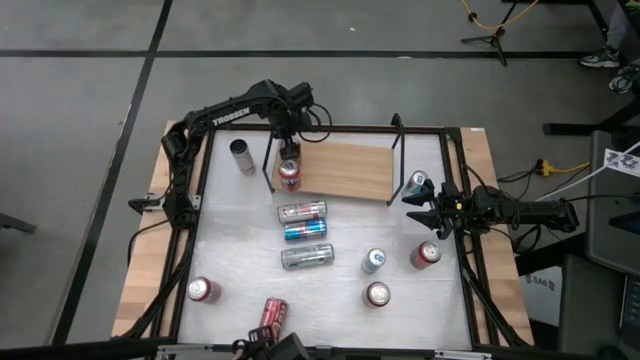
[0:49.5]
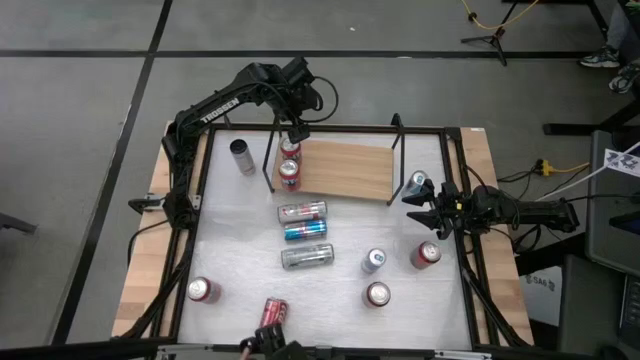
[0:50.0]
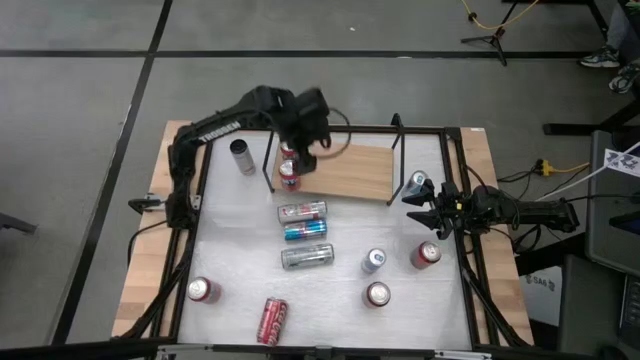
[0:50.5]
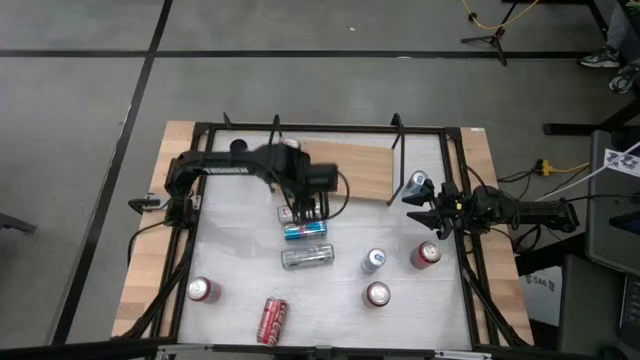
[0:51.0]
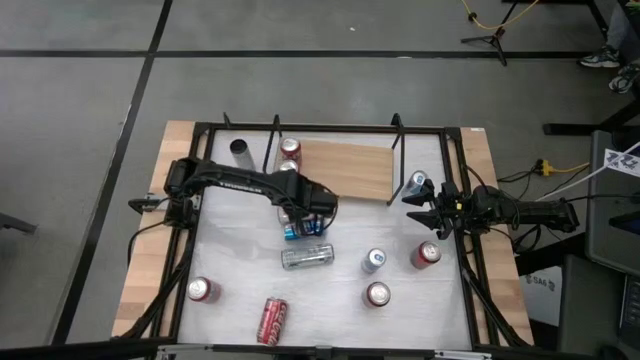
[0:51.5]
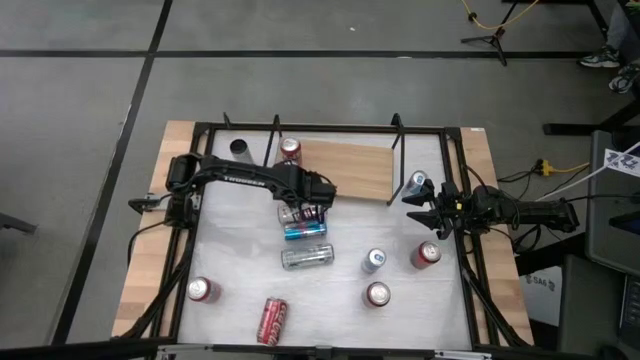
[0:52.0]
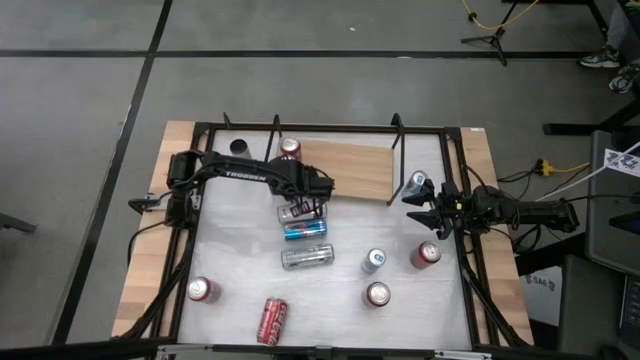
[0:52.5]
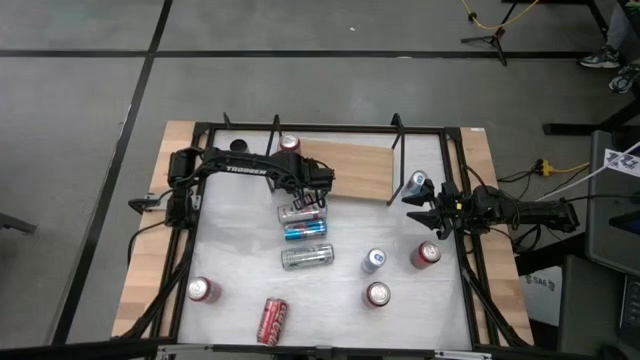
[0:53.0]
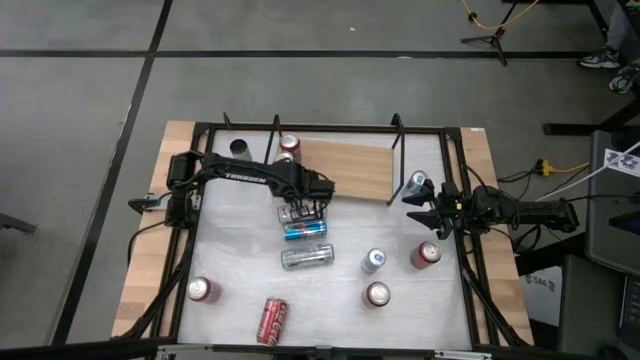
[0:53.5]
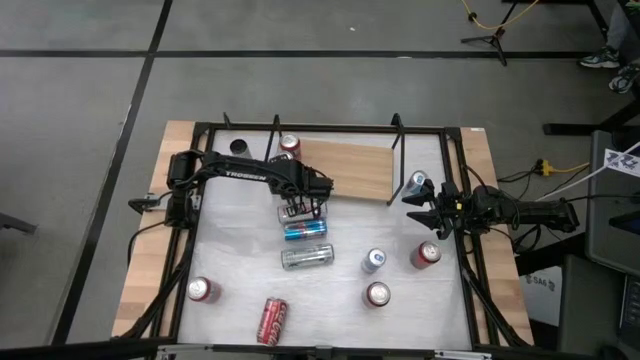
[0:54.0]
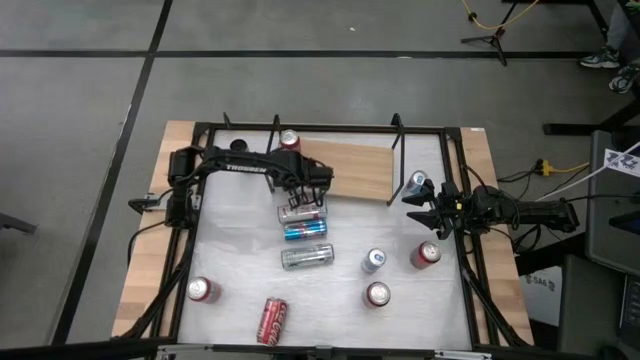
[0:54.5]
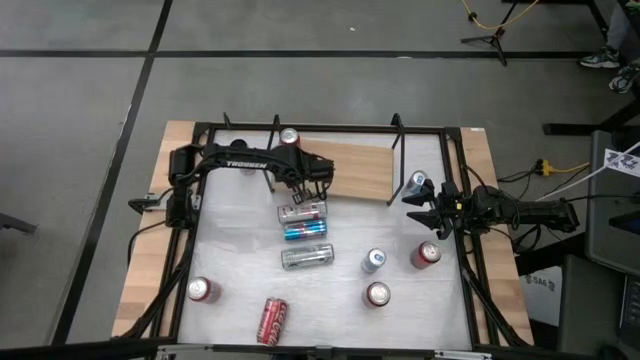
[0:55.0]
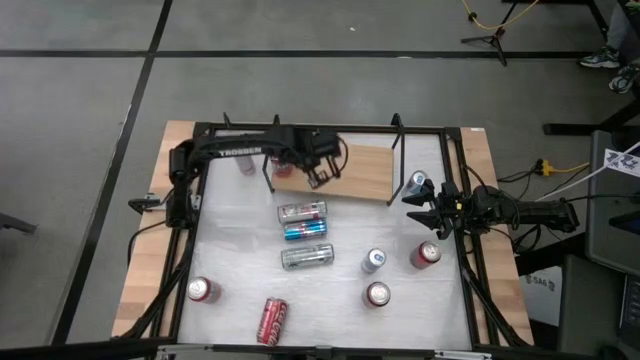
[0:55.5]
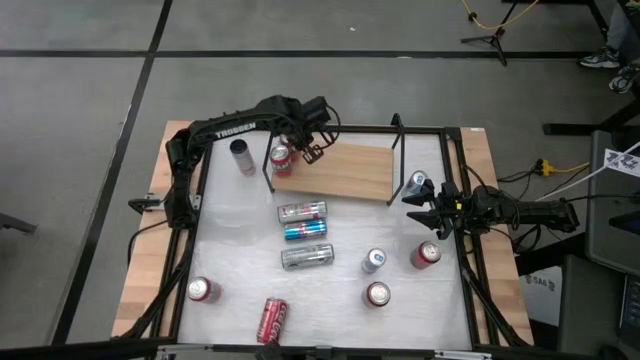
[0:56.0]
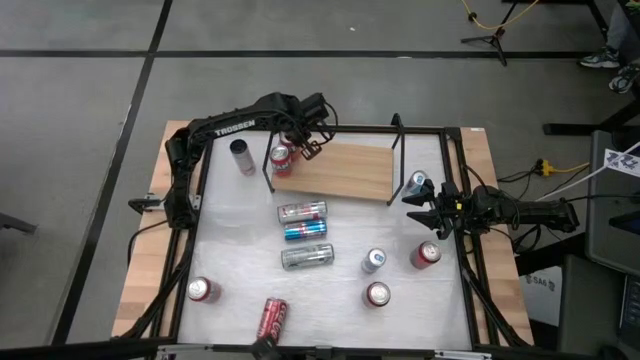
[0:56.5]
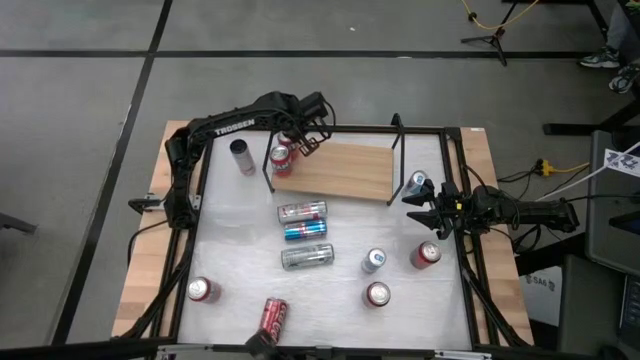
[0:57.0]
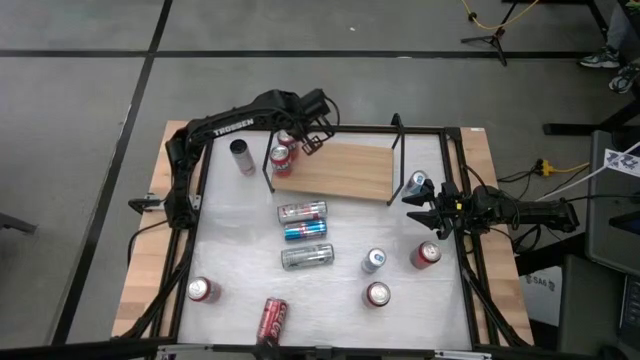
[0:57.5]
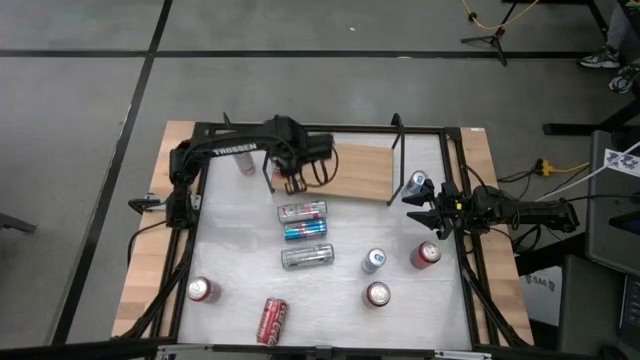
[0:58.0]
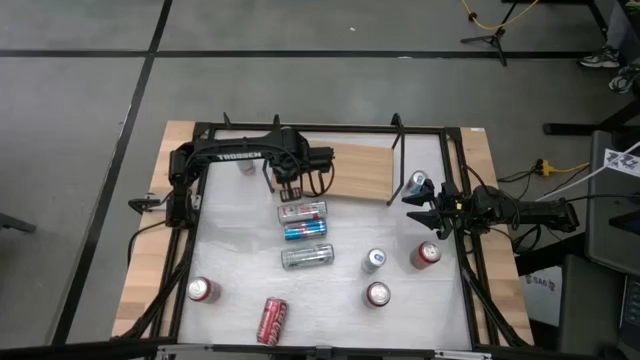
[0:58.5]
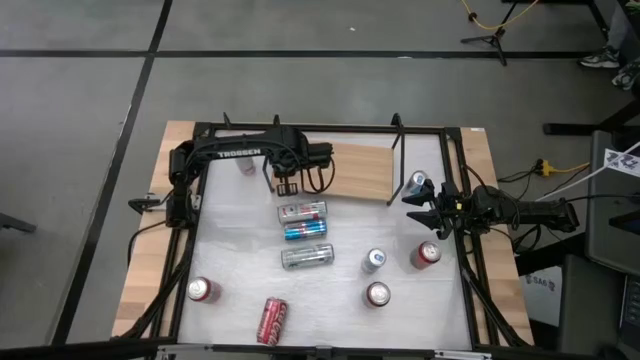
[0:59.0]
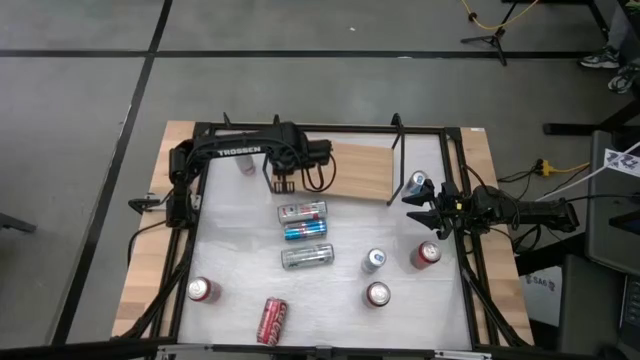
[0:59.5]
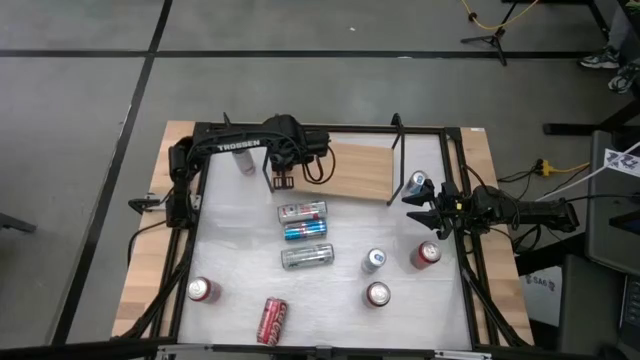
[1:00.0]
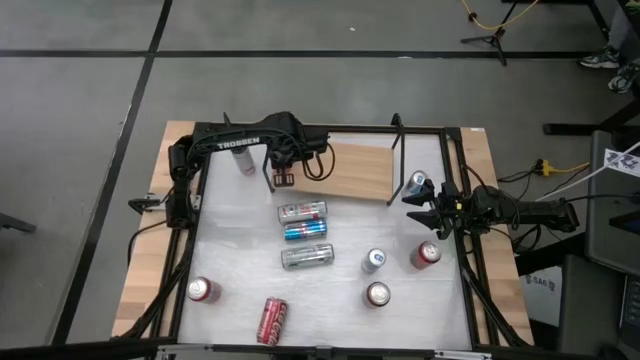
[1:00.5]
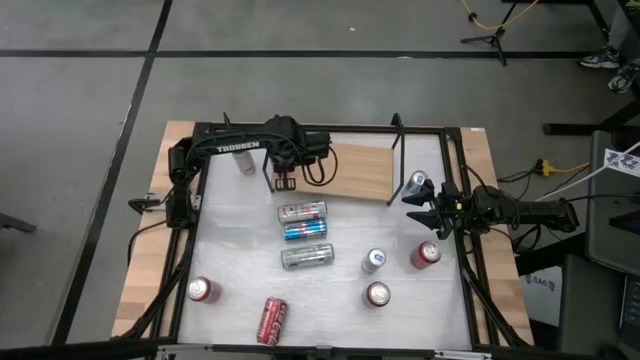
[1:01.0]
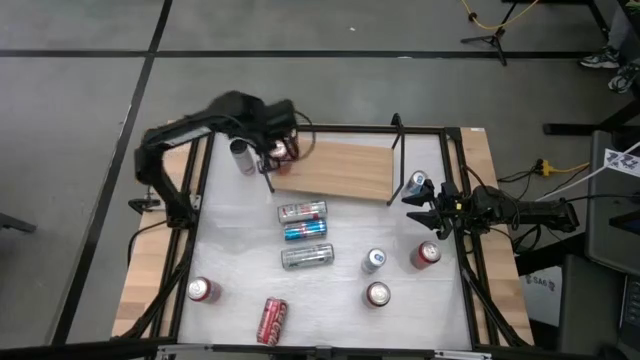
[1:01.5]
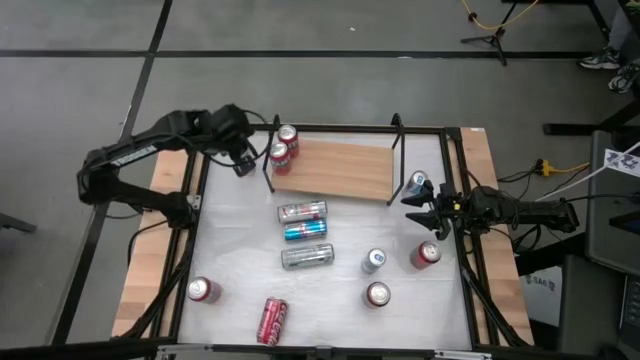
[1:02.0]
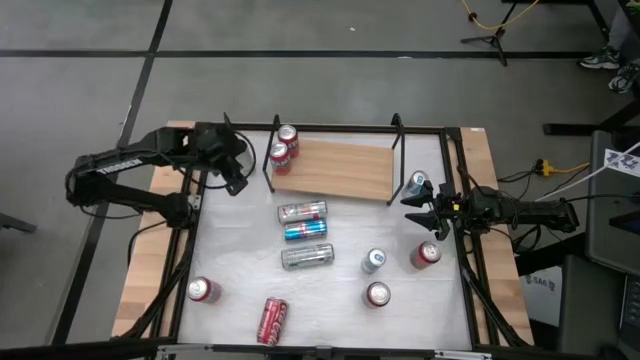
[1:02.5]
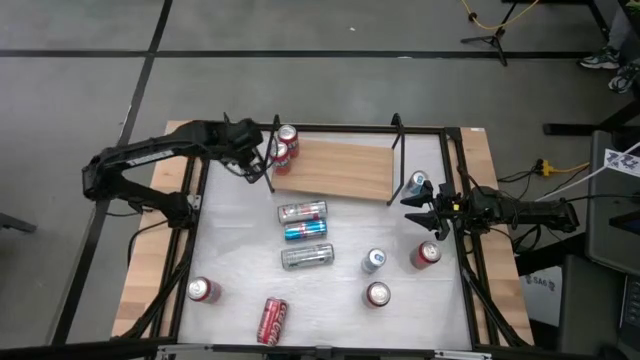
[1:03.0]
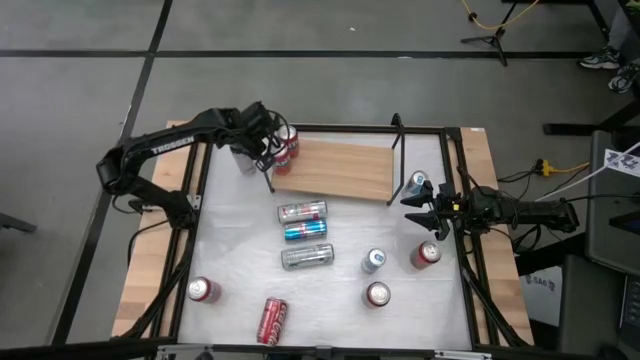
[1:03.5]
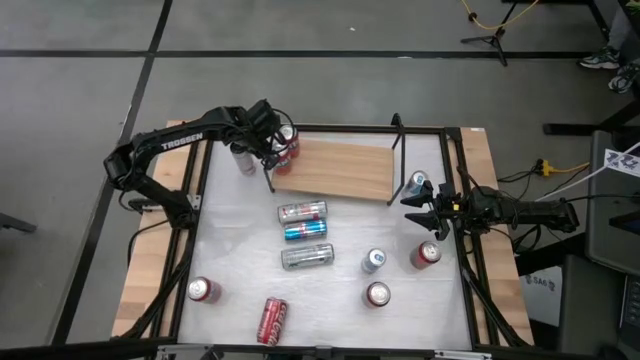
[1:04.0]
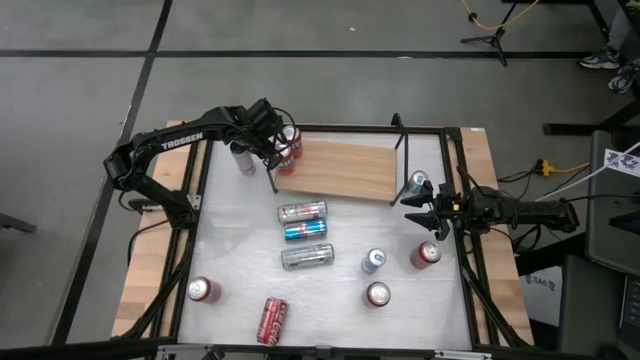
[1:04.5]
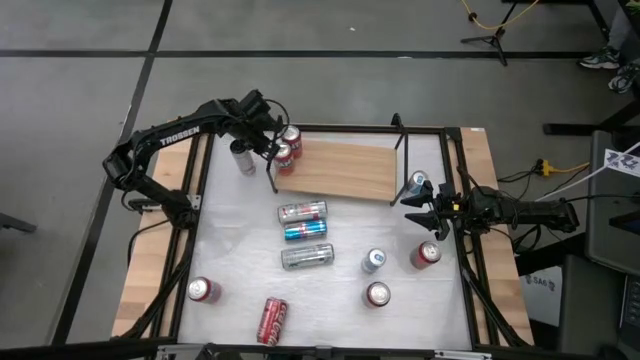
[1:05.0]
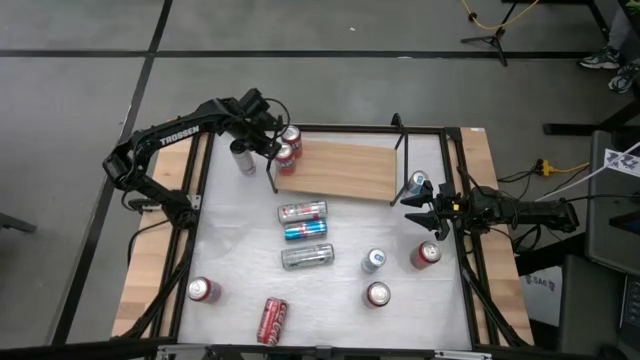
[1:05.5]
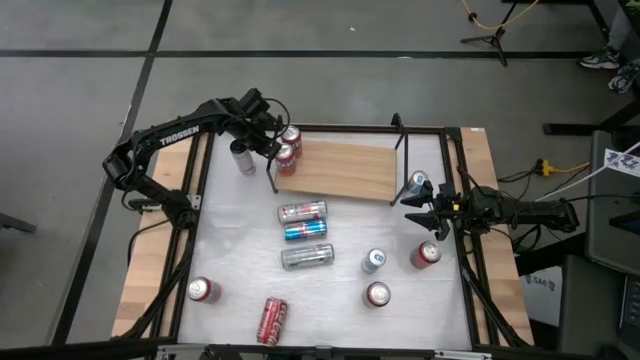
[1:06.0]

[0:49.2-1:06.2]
Task: Place canned beverage on shelf
Adjust the red soda cans on the shelf

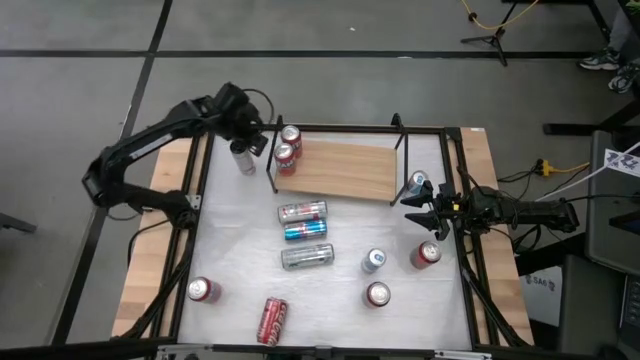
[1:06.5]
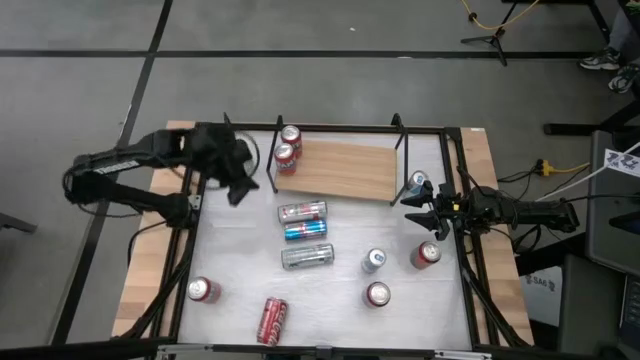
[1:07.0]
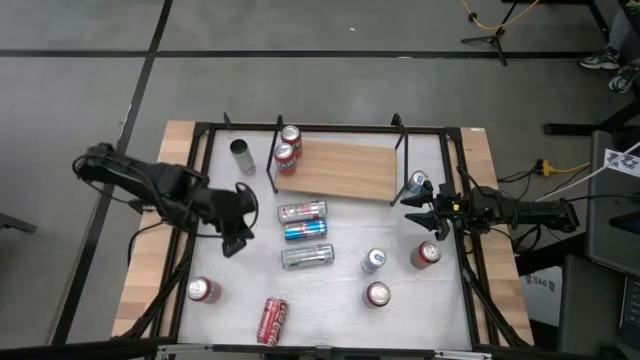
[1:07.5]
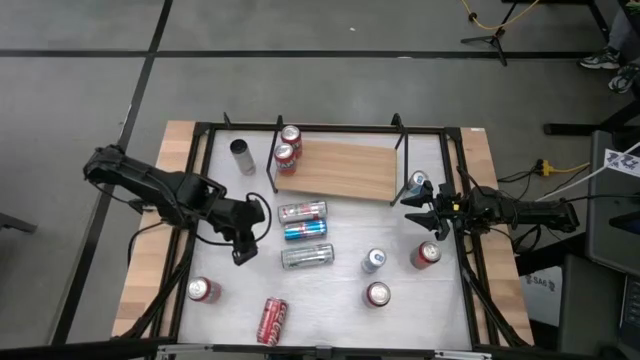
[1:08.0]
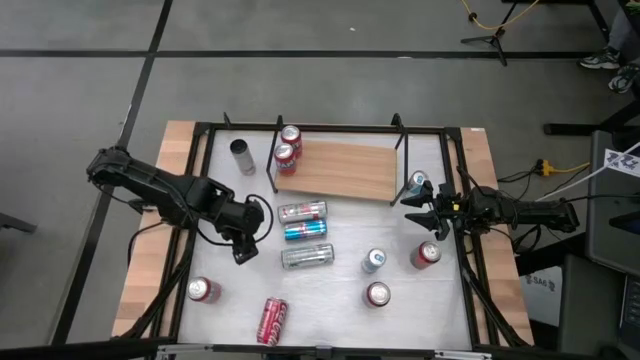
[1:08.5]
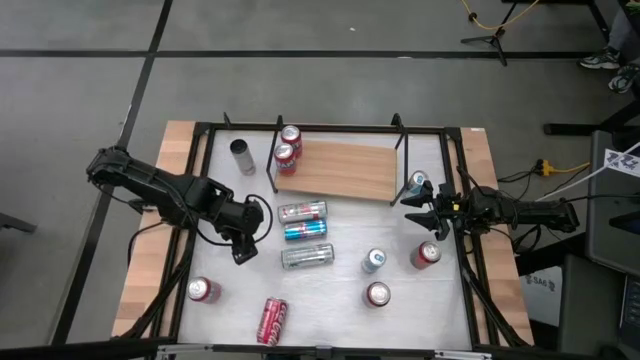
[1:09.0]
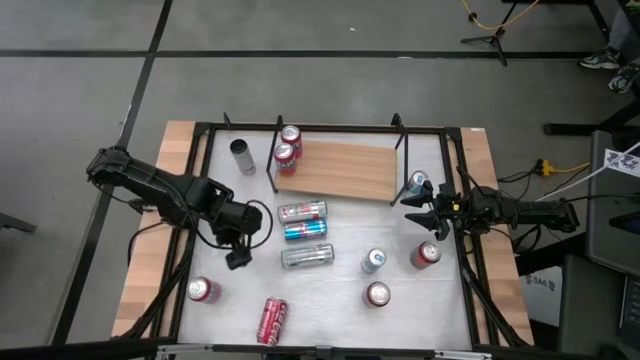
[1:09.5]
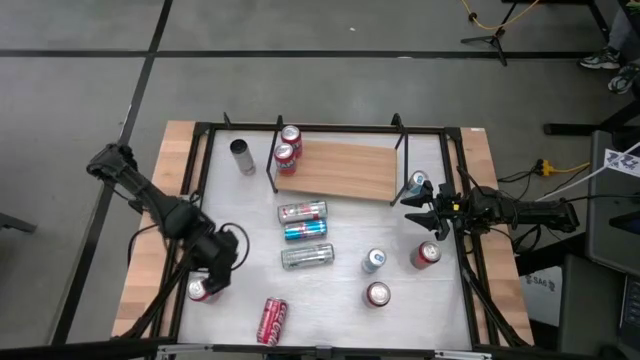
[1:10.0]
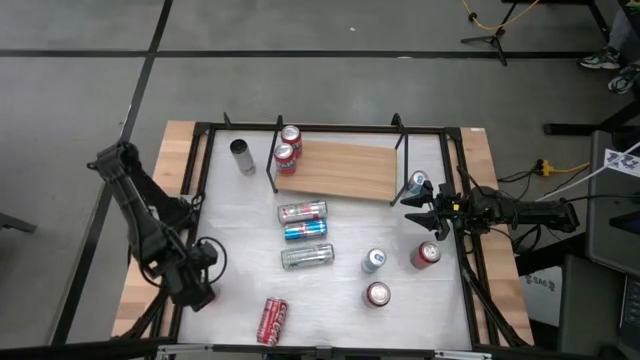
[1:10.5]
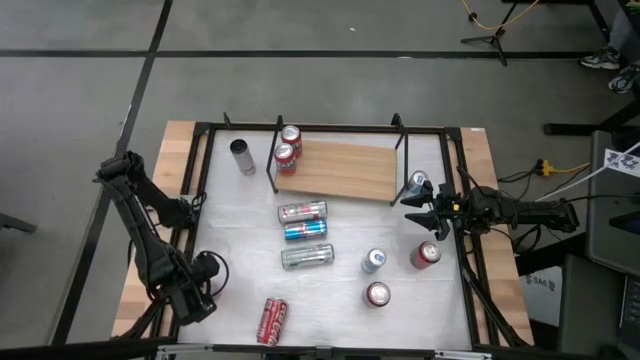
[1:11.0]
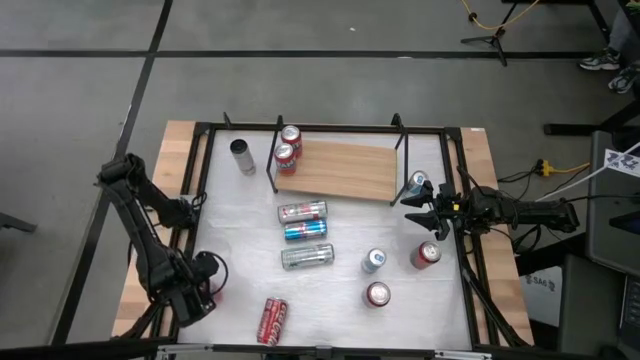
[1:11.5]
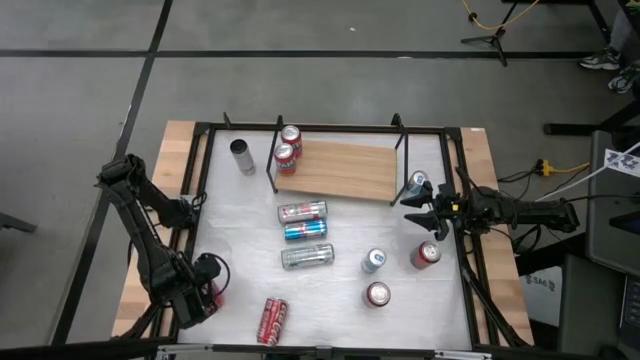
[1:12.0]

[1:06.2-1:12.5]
Put the red soda can on the shelf
